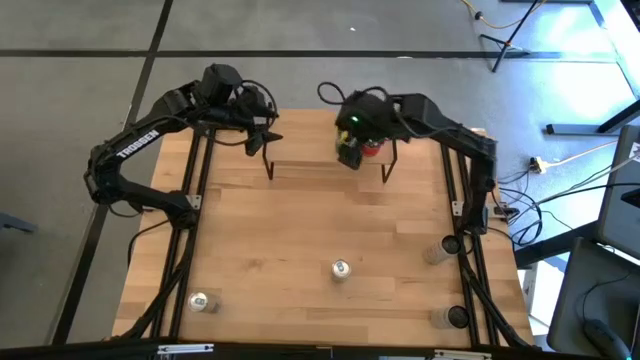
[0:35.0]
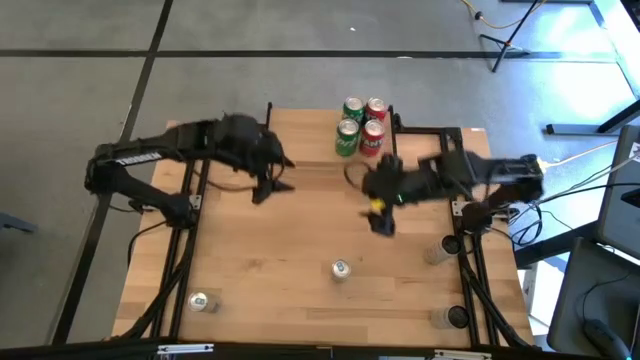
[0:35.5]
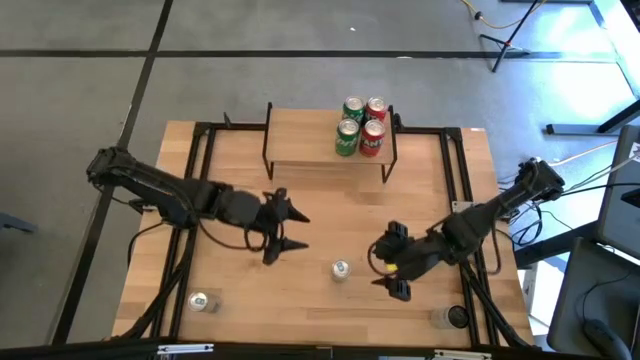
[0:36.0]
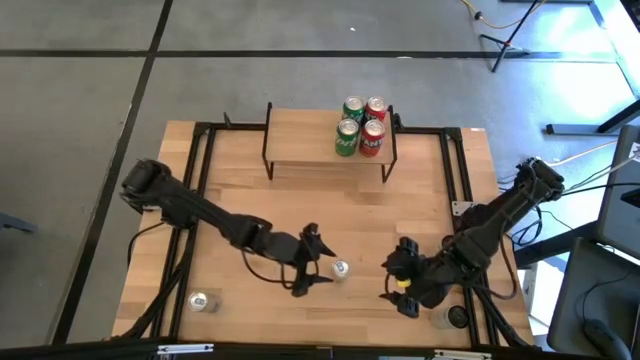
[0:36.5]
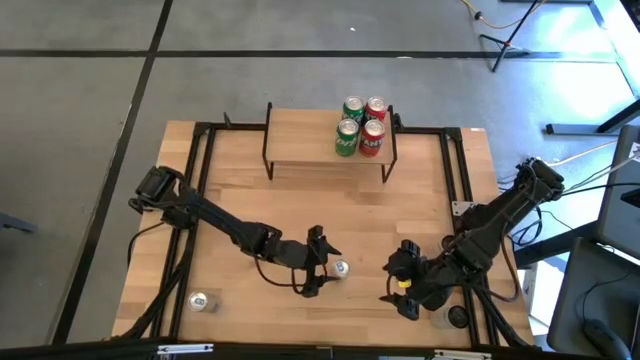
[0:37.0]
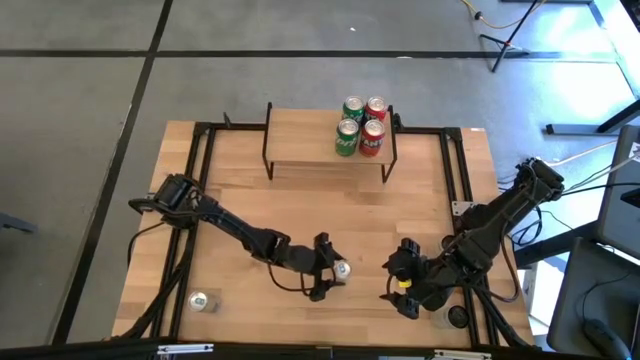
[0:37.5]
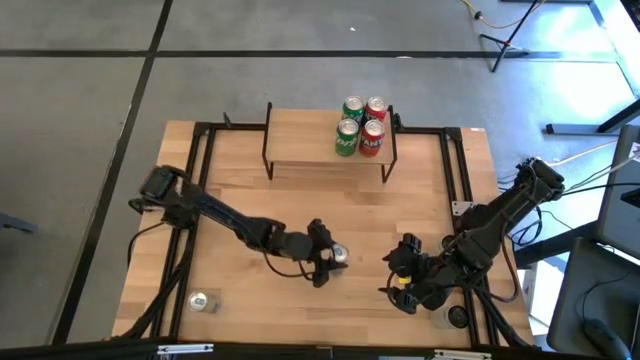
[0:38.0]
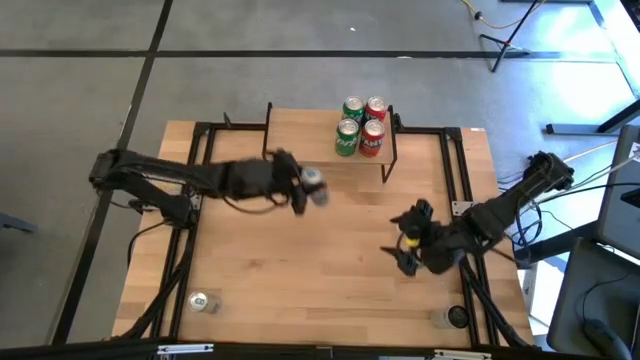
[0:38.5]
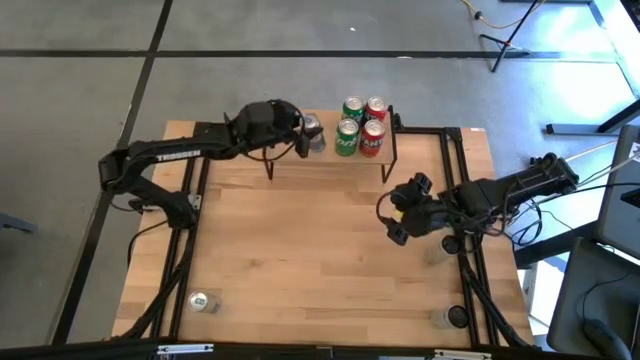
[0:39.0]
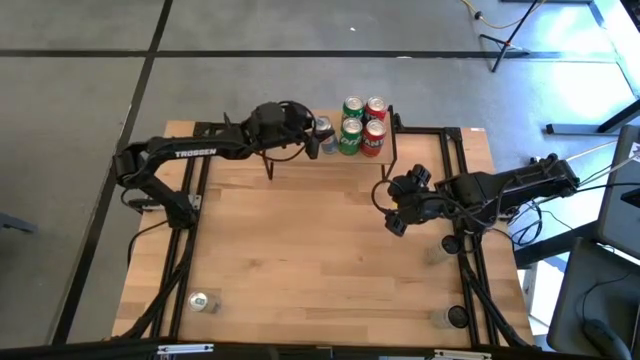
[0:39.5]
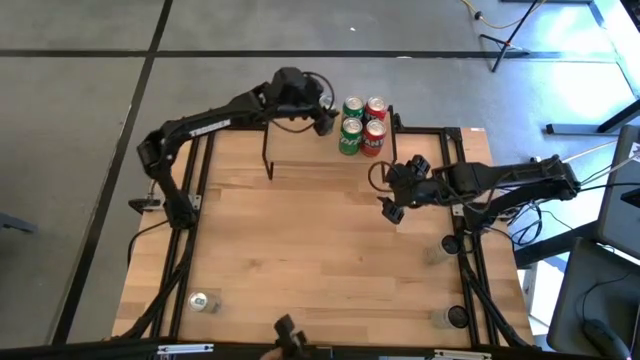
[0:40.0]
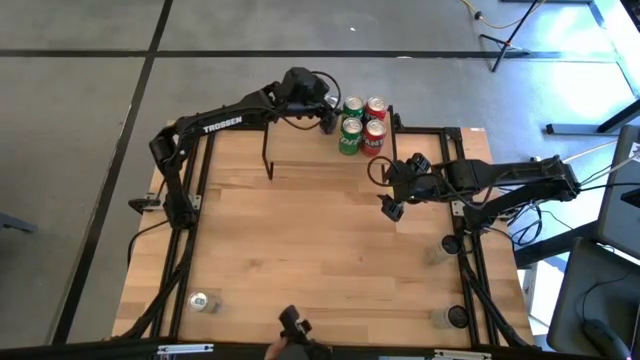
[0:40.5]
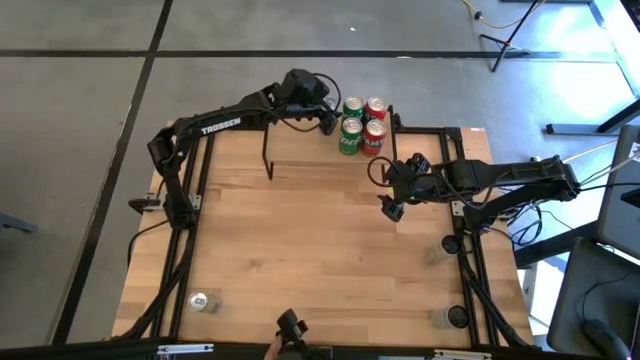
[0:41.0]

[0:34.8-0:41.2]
Task: Place canned beverage on shelf
Put the right blue soda can on the shelf

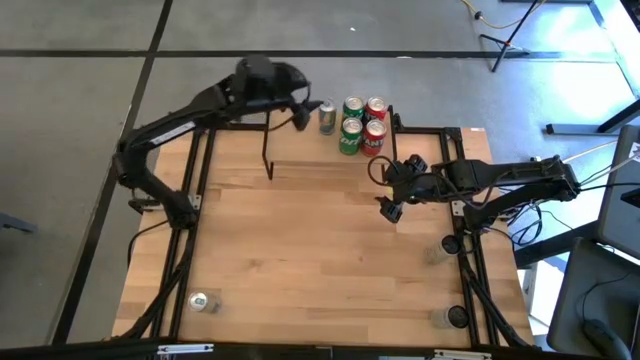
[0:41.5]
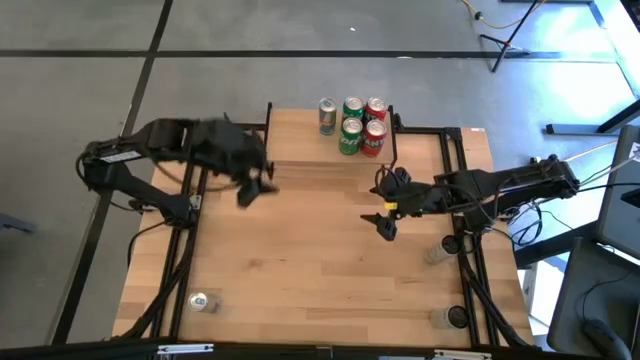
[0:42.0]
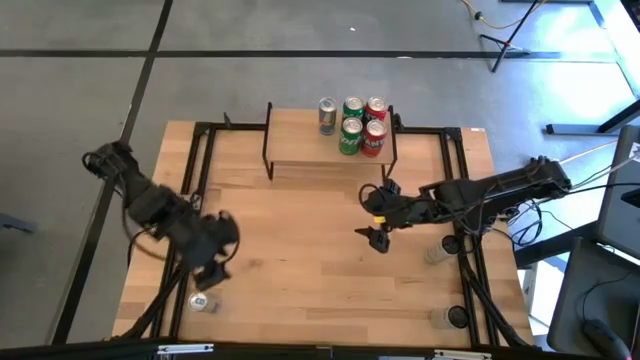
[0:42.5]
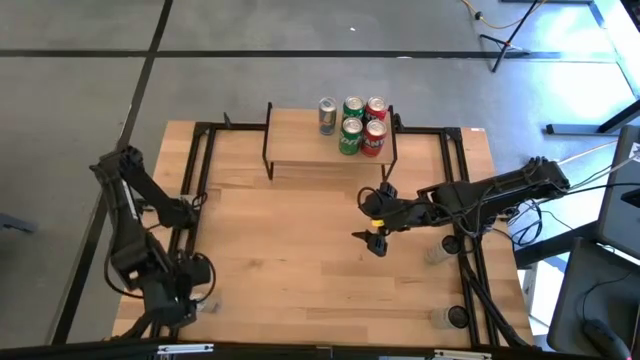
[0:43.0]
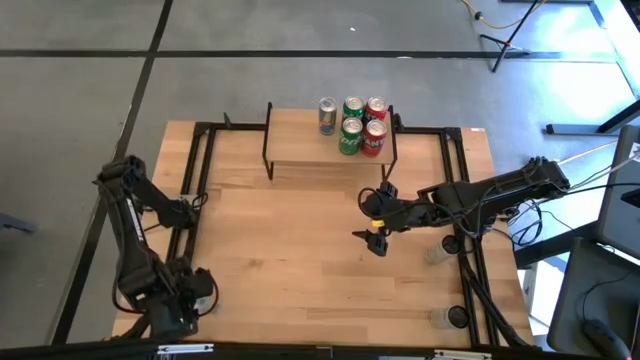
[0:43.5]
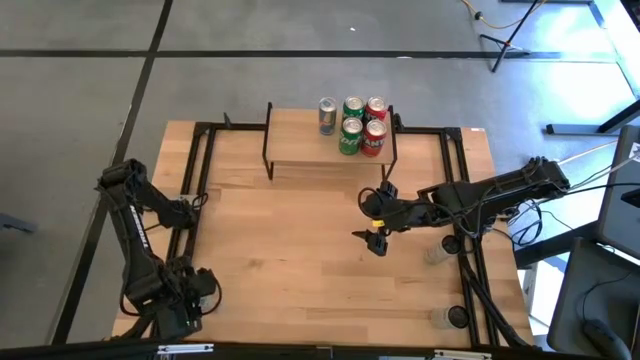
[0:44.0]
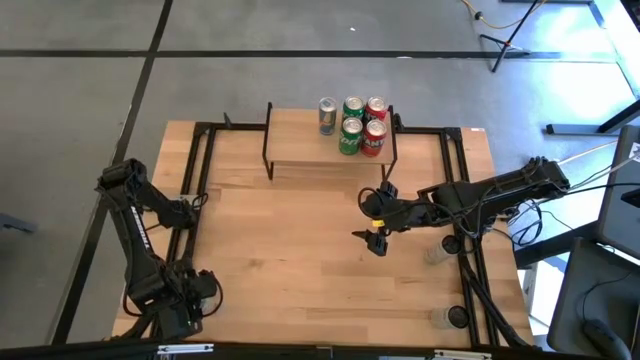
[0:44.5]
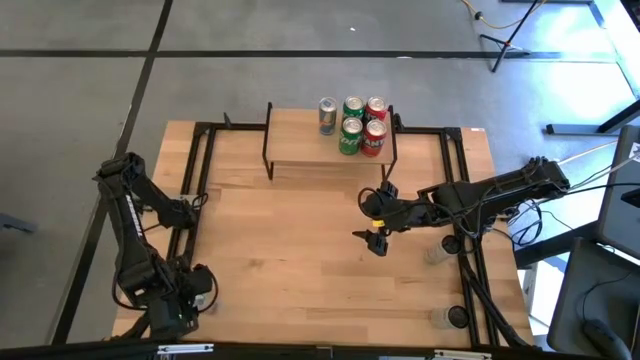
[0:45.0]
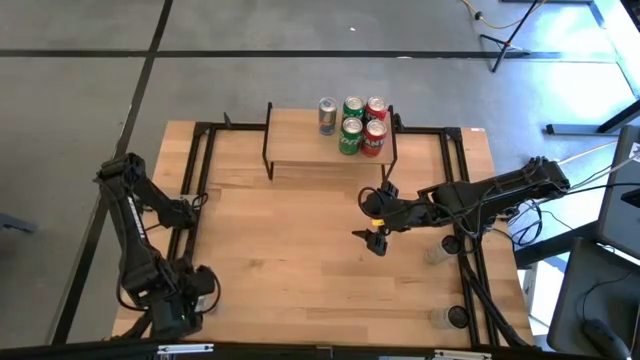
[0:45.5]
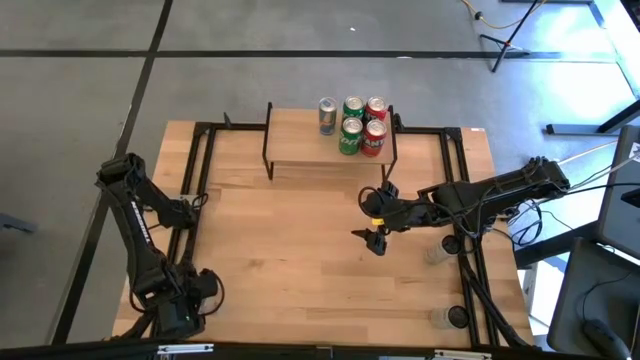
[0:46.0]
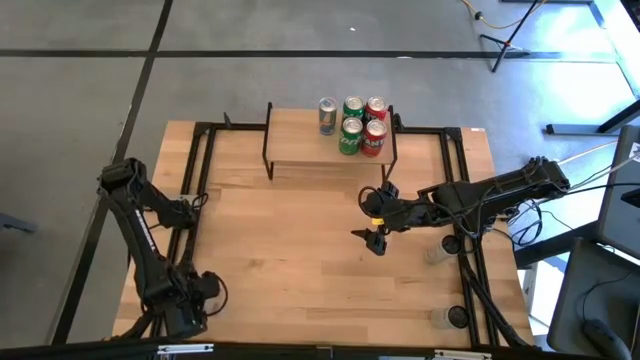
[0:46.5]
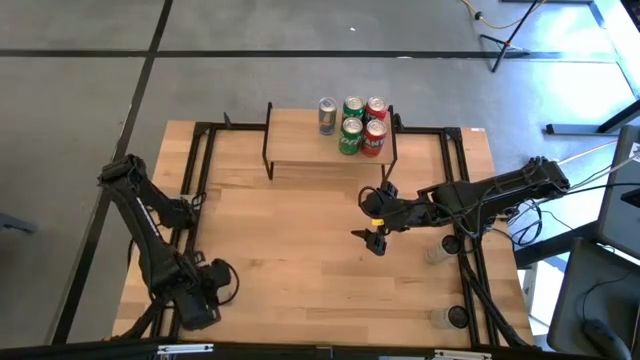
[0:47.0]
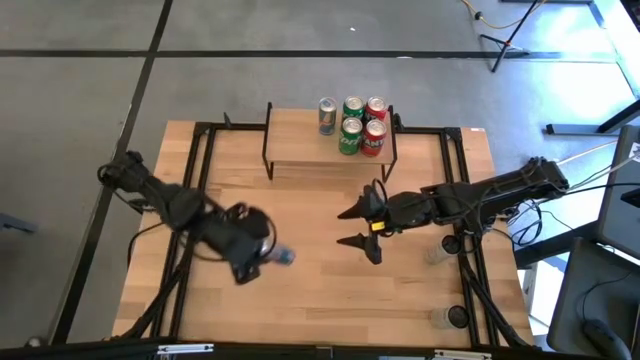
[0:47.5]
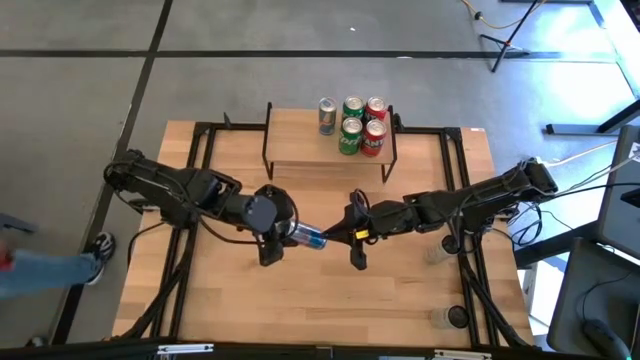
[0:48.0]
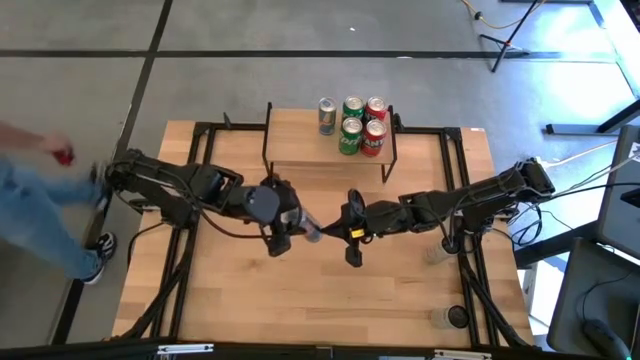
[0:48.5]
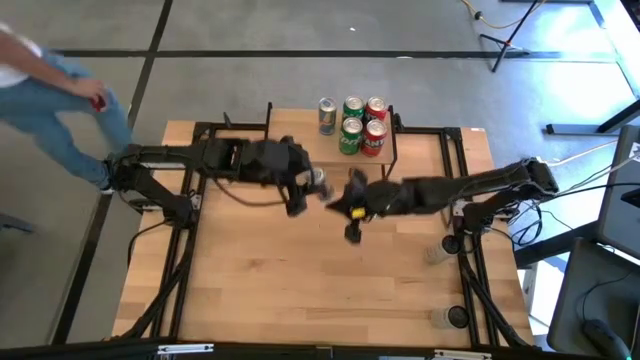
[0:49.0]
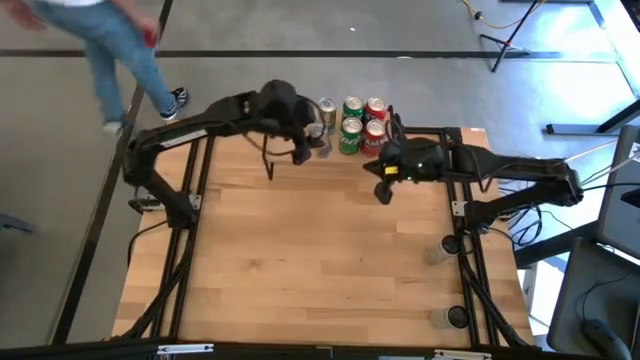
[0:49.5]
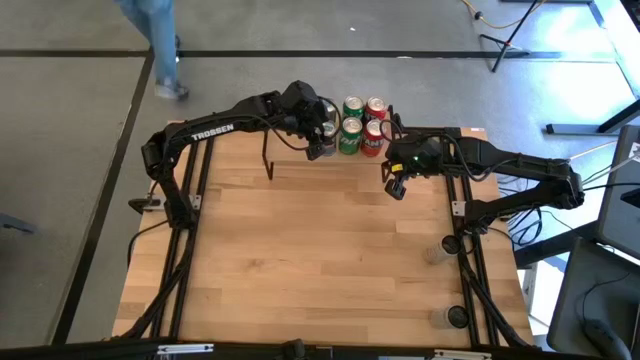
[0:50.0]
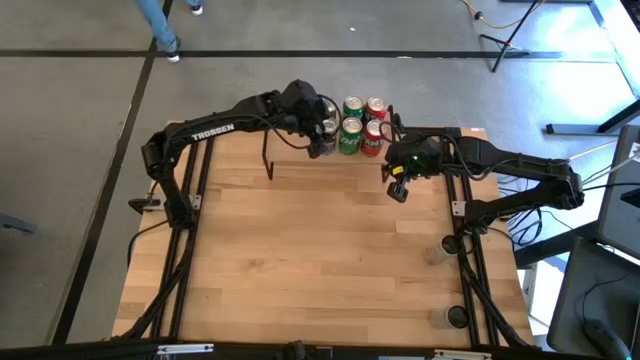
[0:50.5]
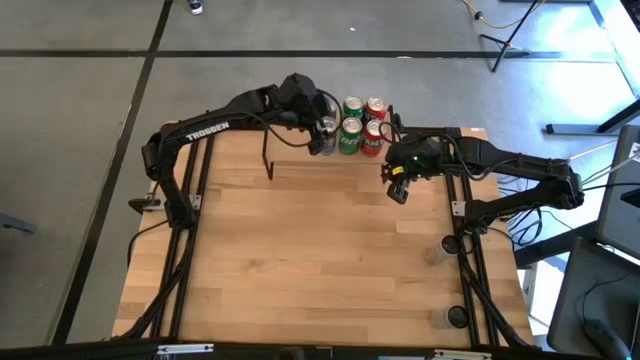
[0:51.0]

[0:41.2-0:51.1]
Put the blue soda can on the shelf aligned with the other blue soda can

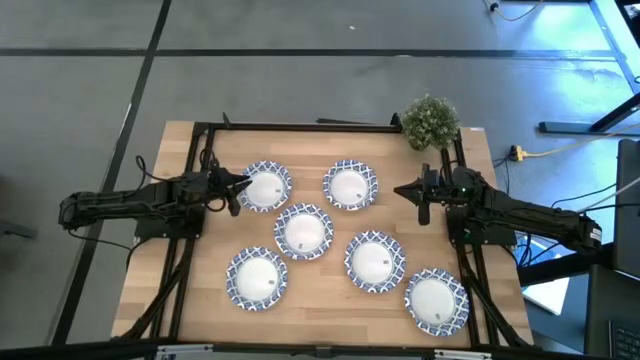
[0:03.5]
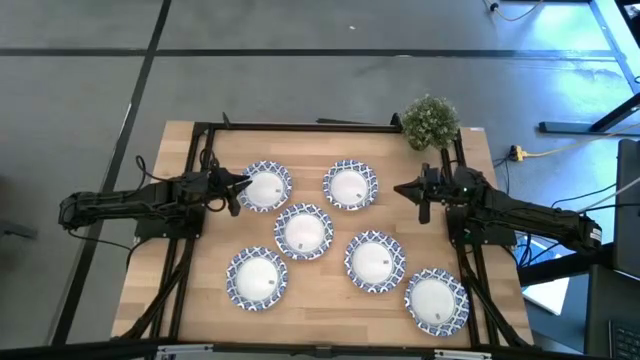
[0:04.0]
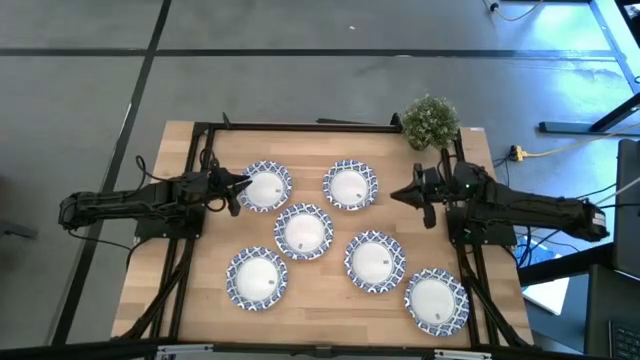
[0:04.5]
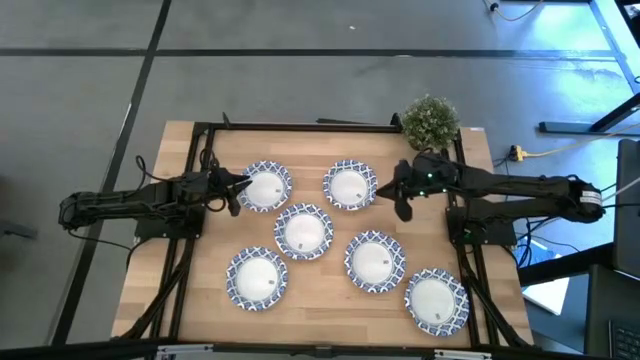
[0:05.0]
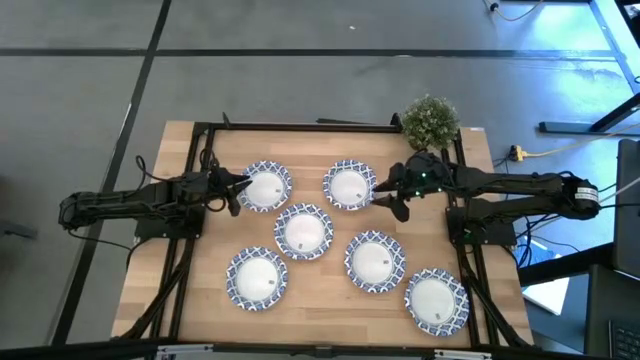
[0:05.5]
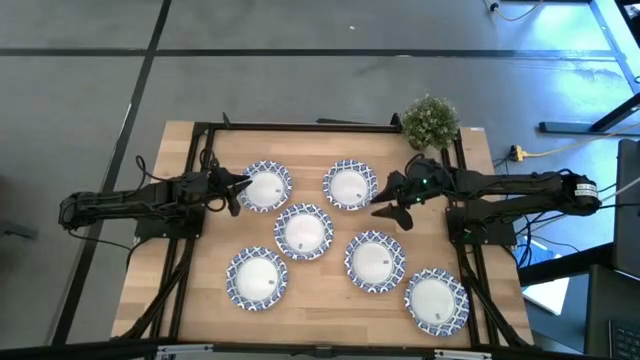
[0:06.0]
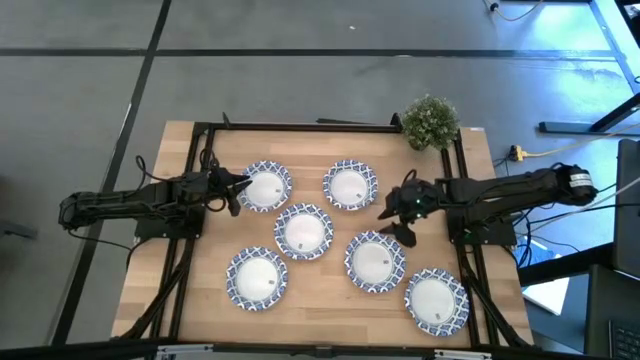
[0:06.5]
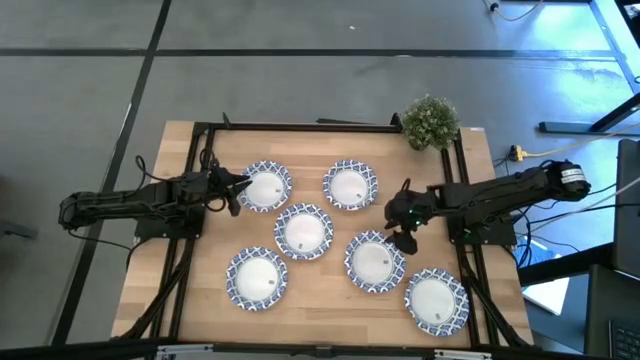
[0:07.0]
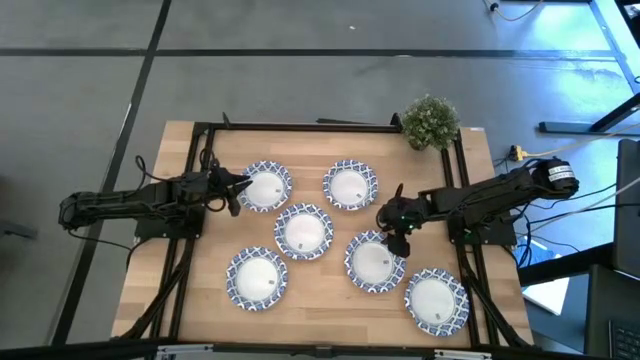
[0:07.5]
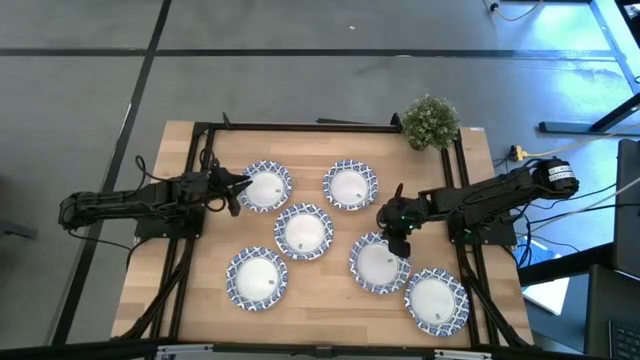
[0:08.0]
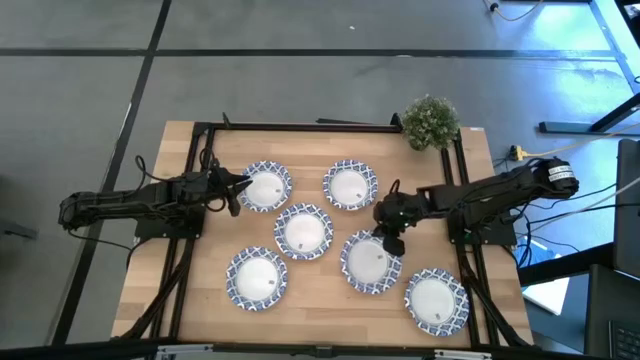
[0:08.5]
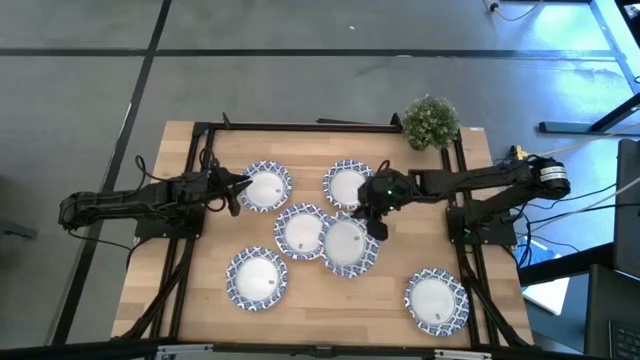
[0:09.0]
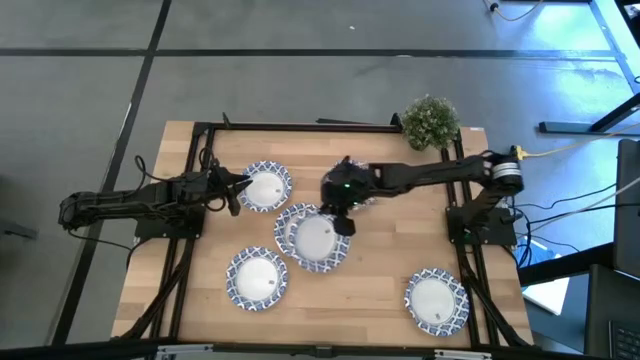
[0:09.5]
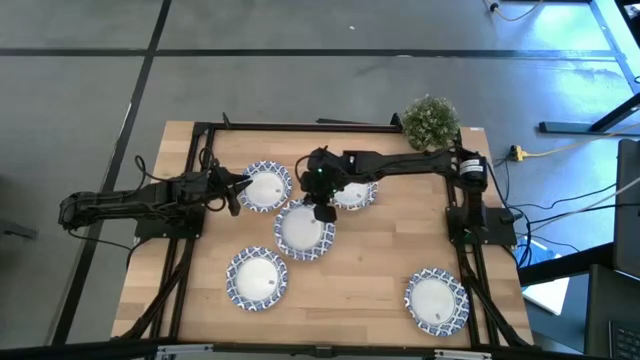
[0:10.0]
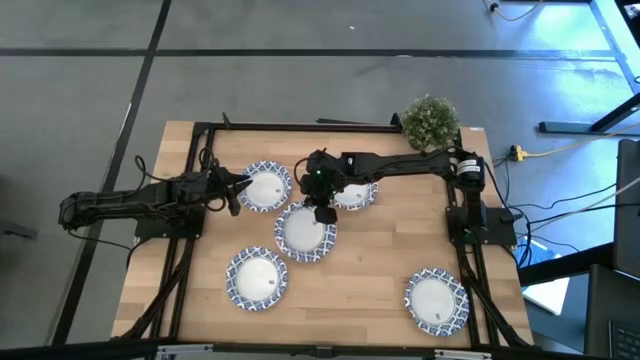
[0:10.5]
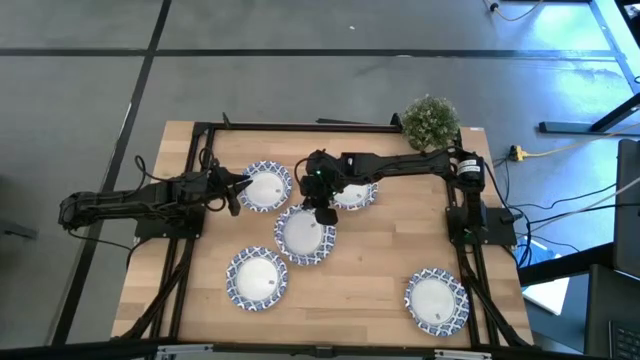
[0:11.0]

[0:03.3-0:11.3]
Task: Nest bowls inside each other
Stack the white patterned bowl on top of the other white patterned bowl
